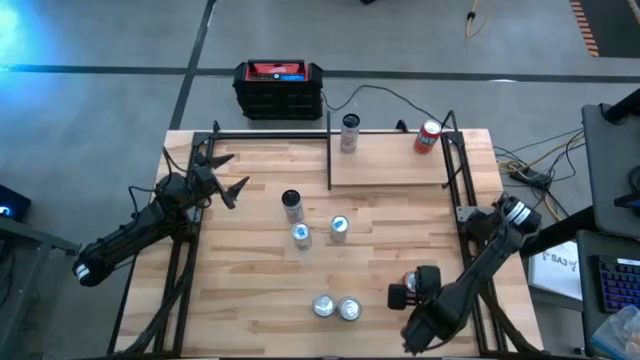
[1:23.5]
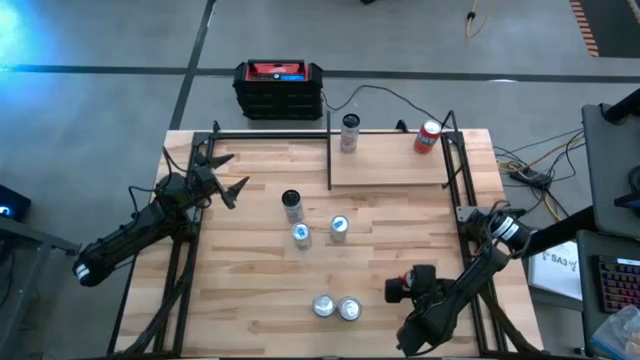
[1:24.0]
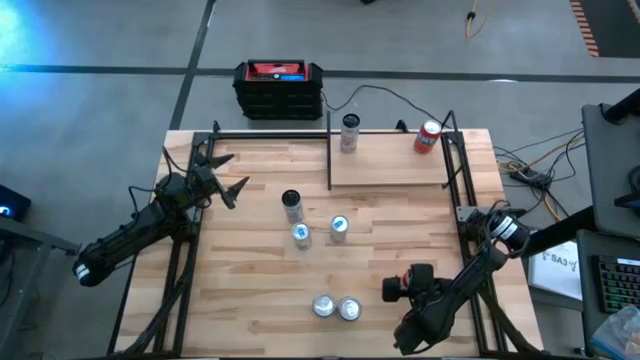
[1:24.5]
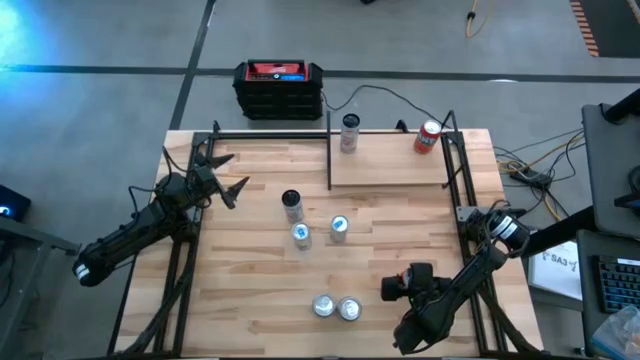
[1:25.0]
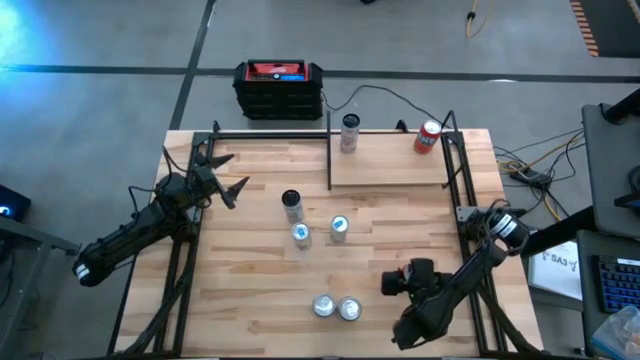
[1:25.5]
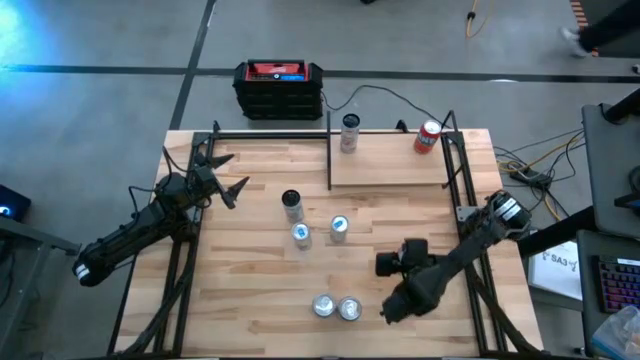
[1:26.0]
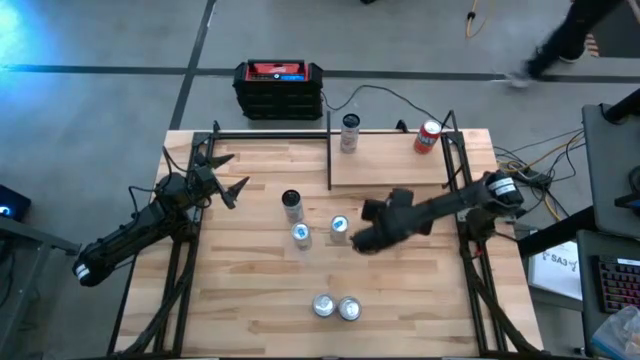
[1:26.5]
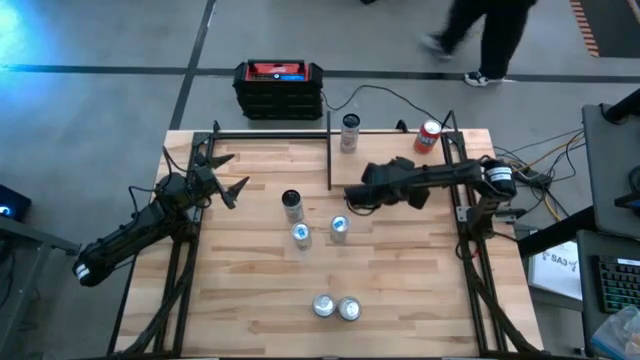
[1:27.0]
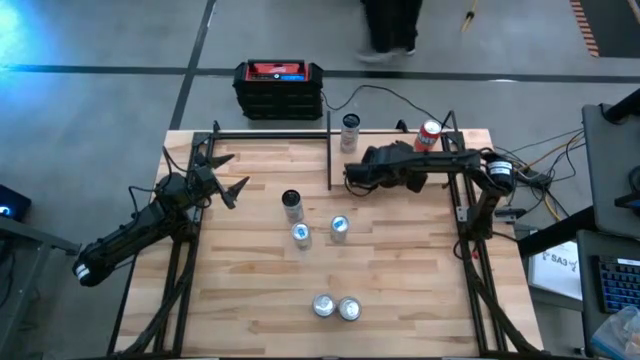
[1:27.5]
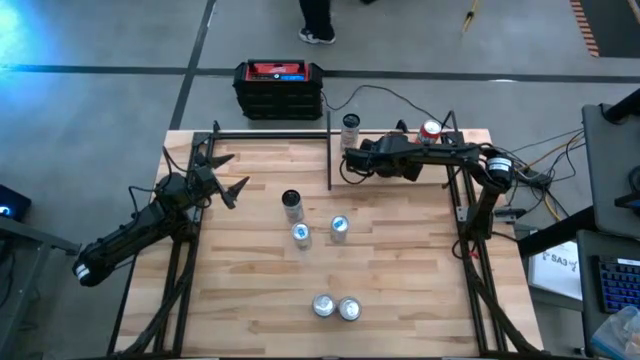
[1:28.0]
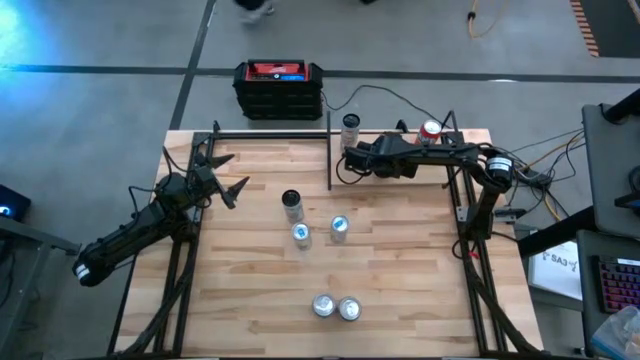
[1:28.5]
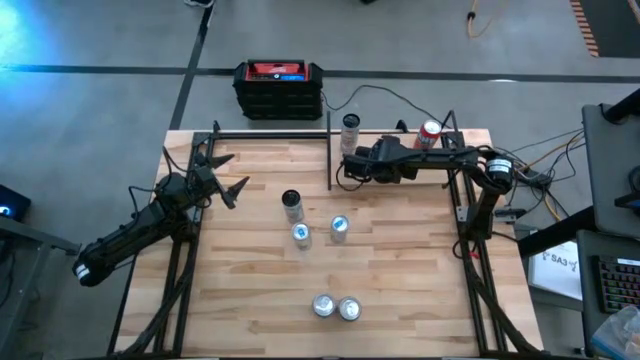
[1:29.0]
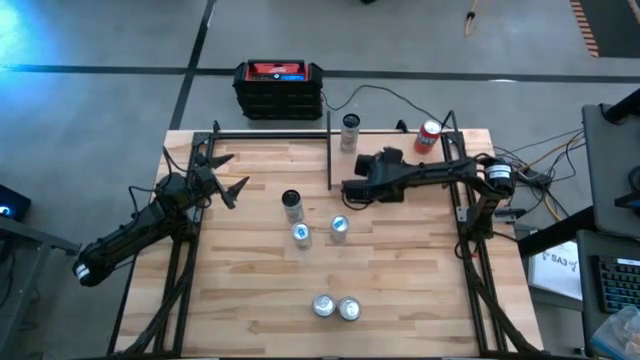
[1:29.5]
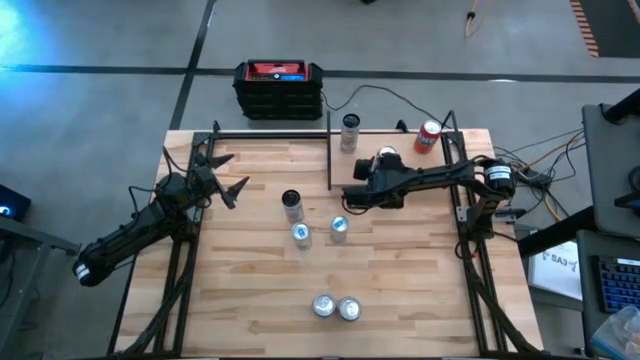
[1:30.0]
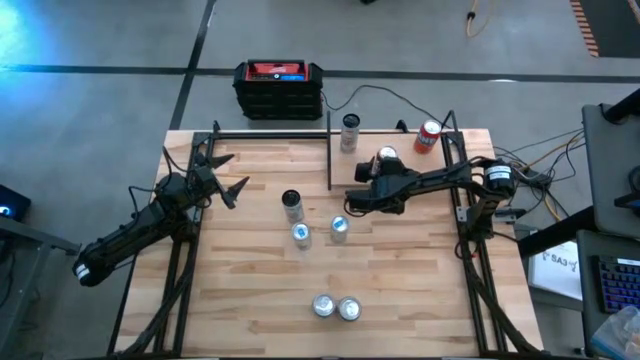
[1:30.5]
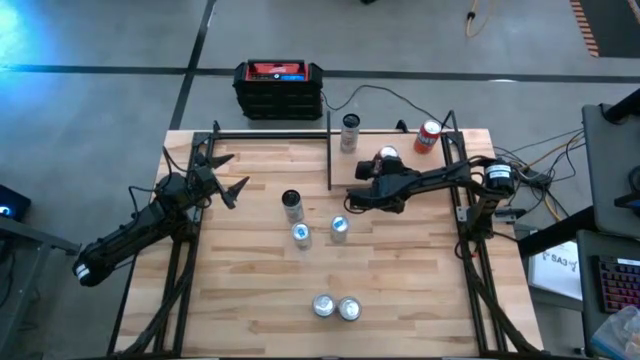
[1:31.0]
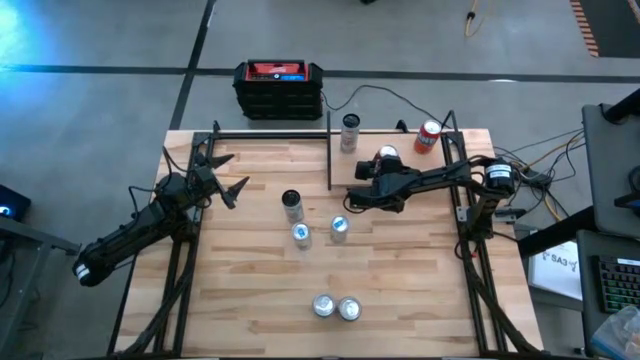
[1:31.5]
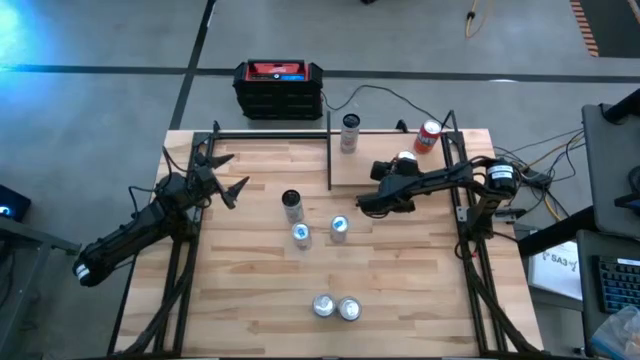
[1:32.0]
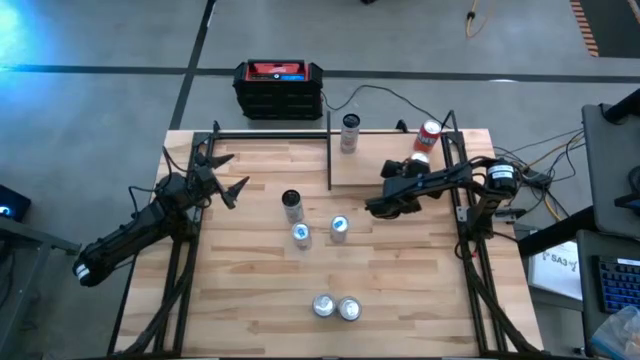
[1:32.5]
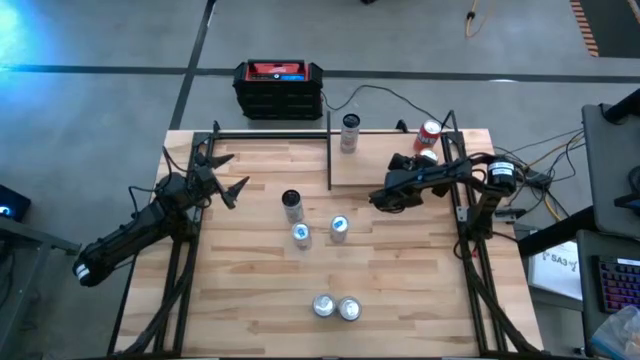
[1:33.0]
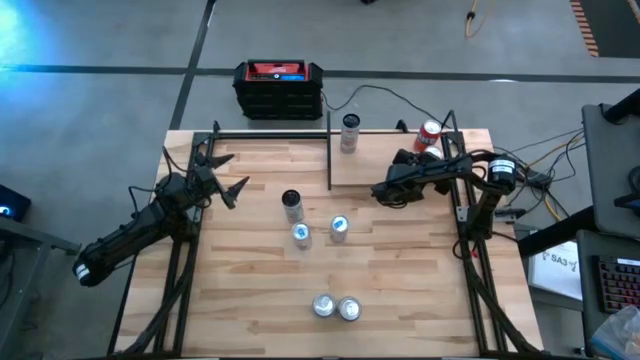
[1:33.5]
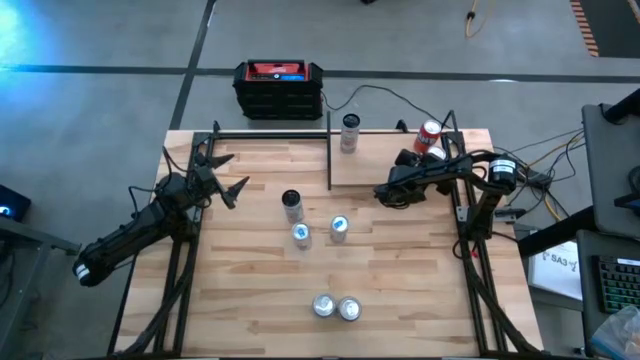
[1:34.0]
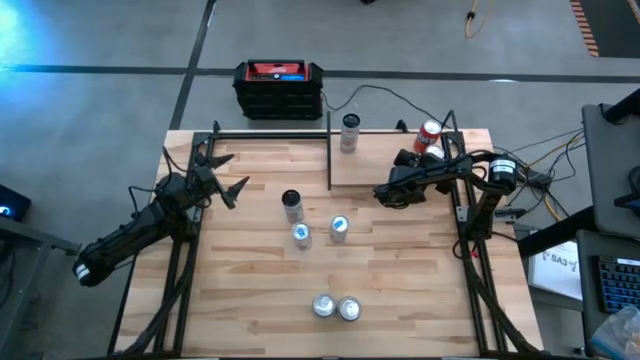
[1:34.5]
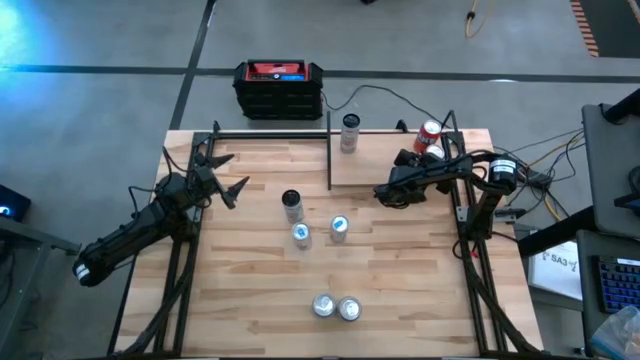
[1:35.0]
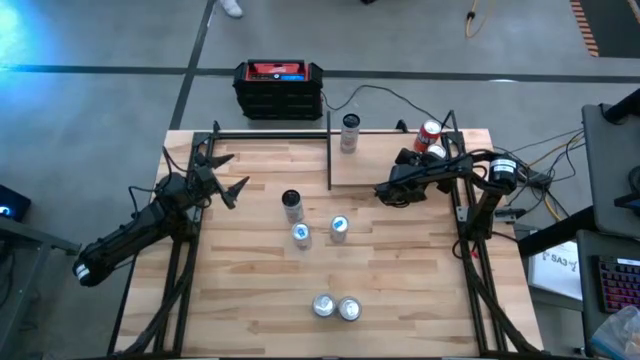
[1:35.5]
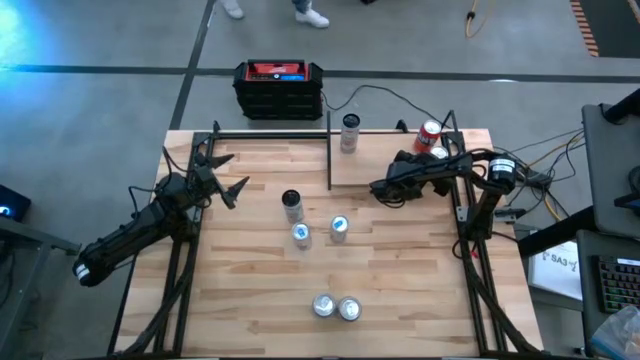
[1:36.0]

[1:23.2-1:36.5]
Task: Place canned beverage on shelf
Put the red soda can on the shelf aligned with the other red soda can

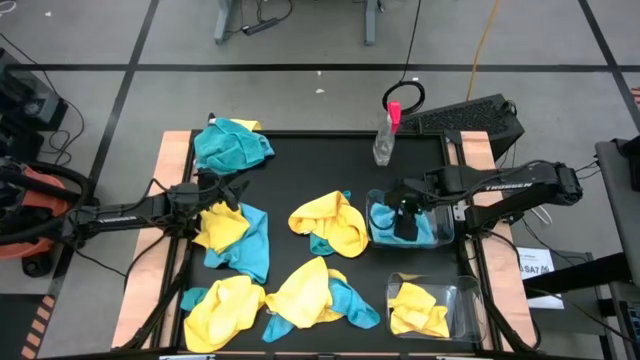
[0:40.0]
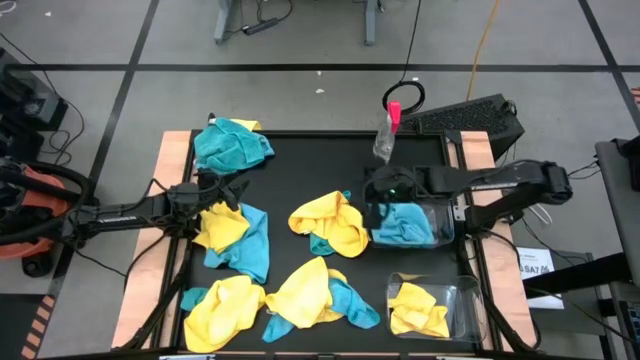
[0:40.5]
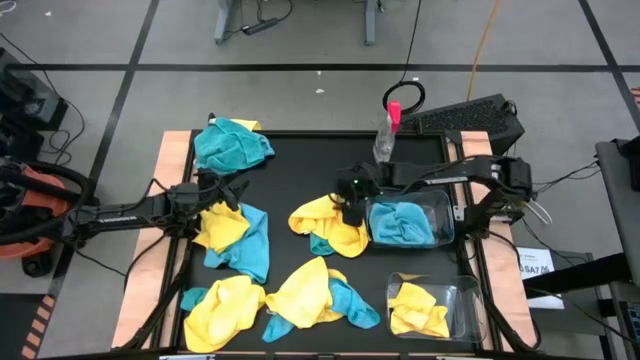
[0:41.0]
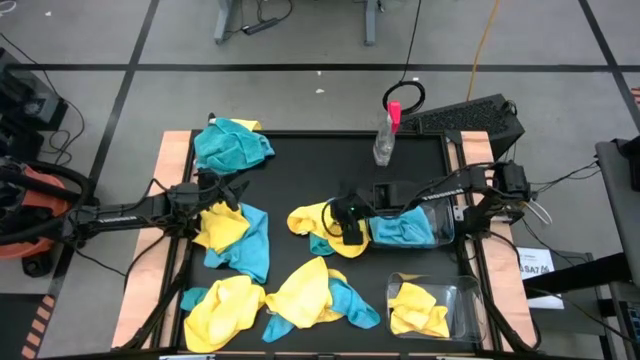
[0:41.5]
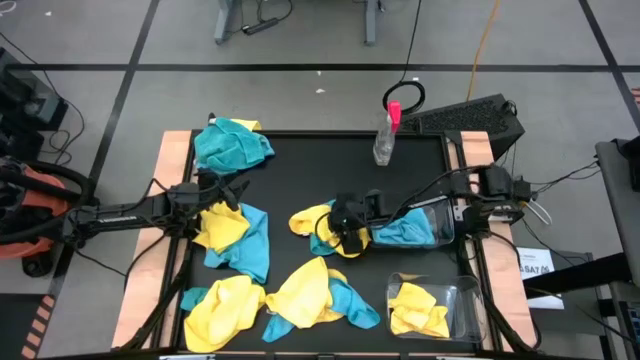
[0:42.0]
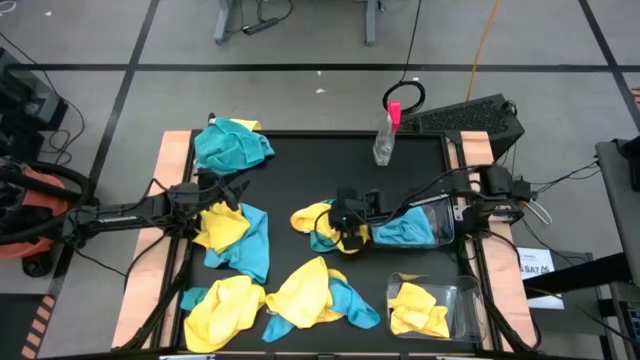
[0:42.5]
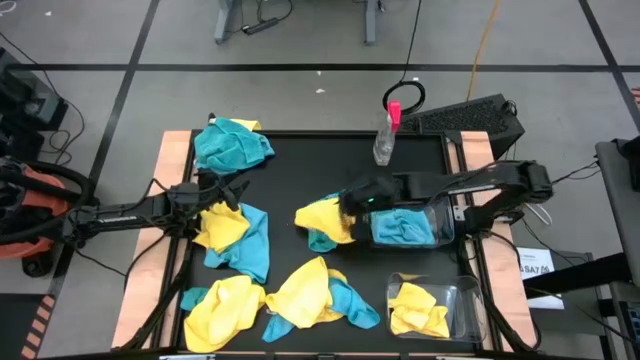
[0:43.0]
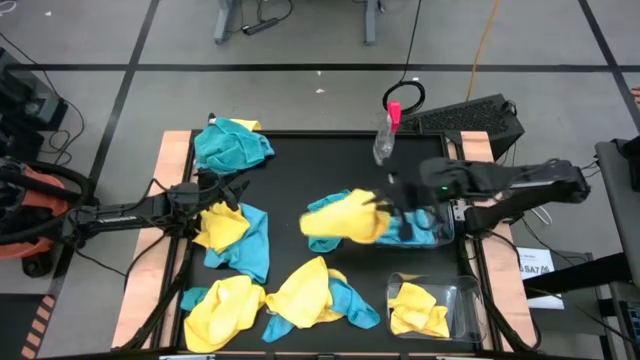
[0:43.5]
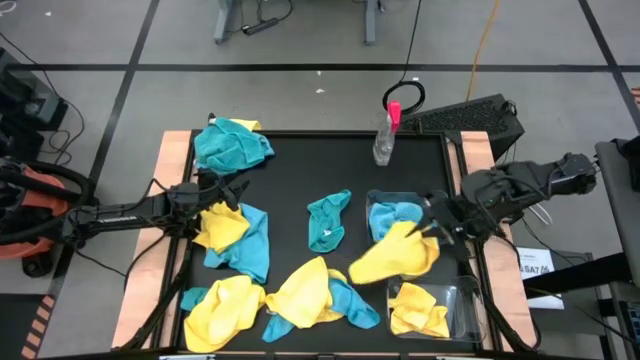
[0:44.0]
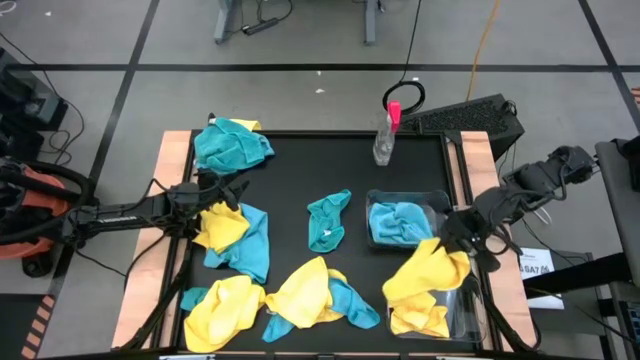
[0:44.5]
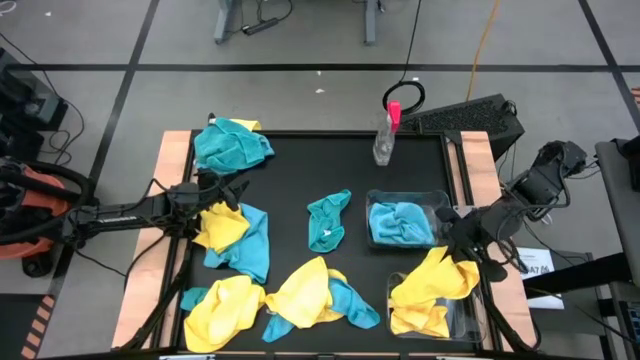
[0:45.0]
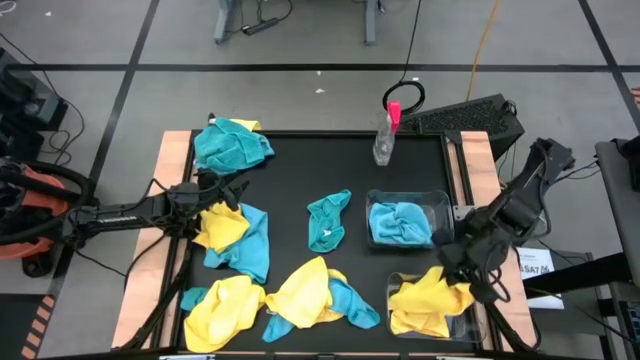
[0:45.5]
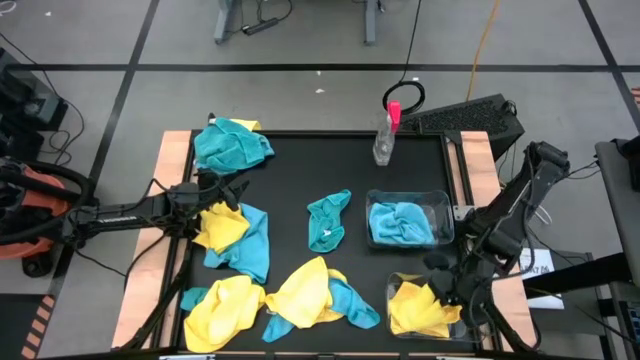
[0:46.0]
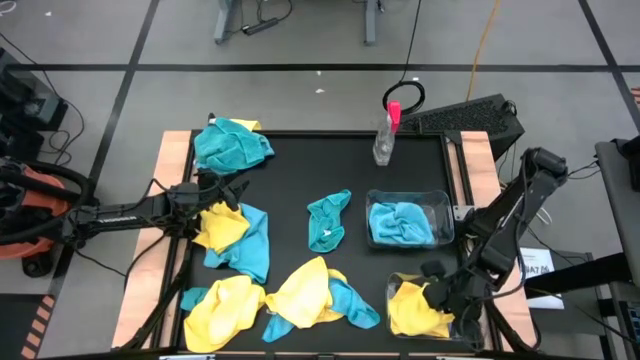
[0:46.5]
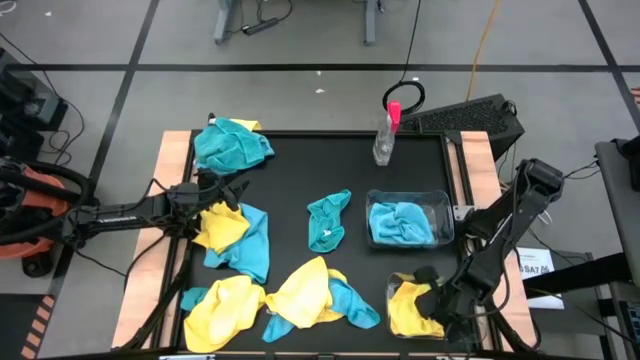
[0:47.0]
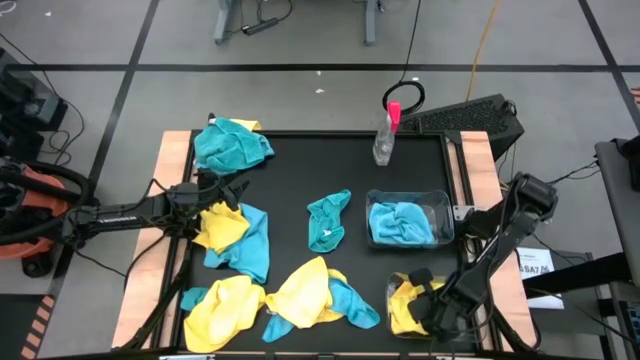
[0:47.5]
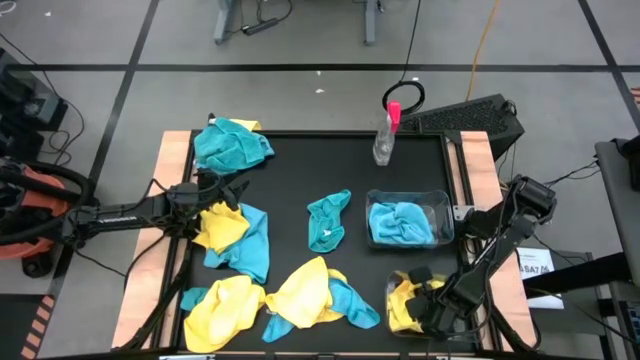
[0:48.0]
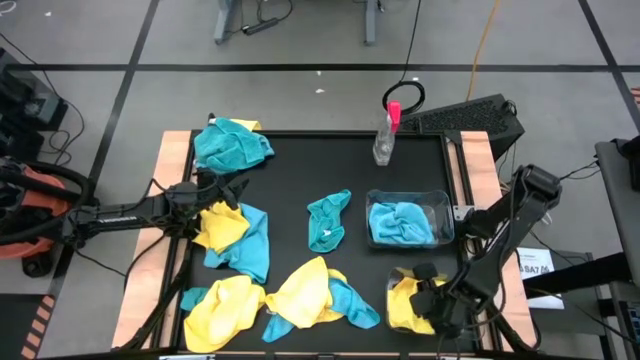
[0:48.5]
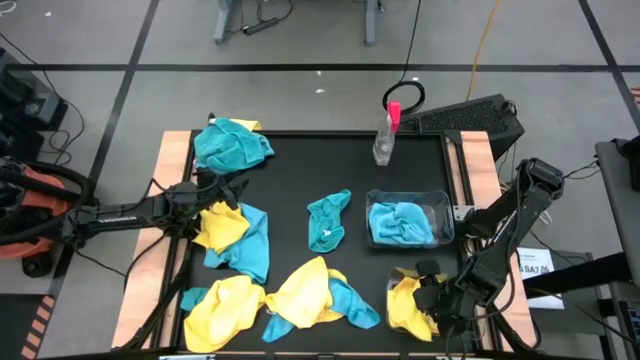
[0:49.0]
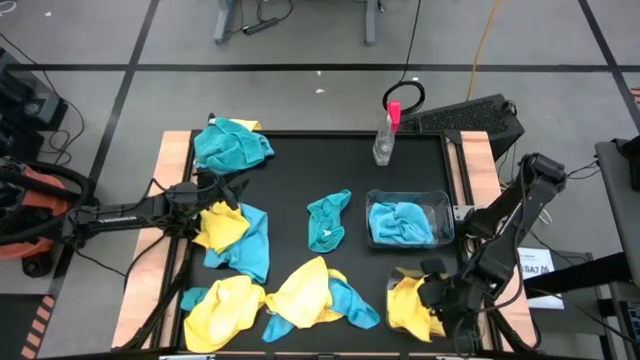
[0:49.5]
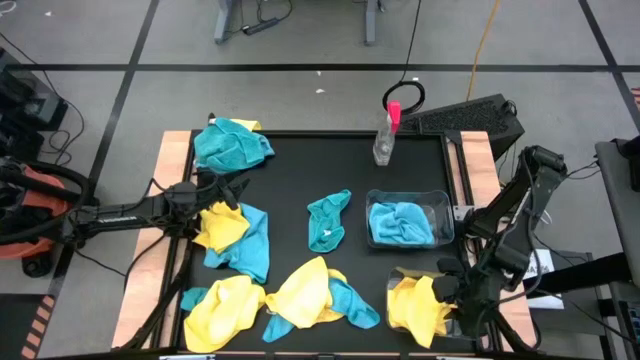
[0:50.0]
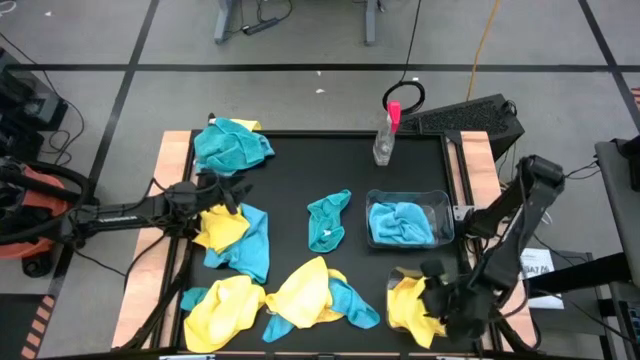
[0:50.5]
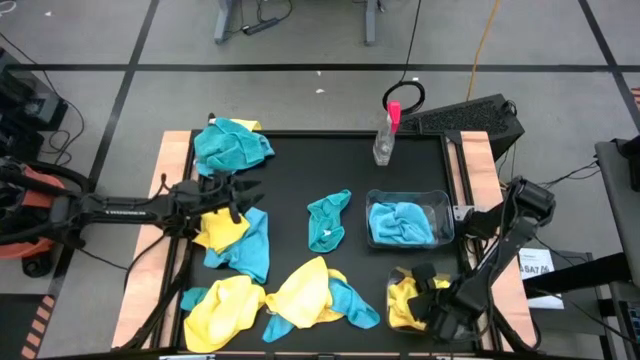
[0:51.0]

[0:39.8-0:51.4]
Task: Sort microfiber towel by color & place in baskets
Put the yellow towel into the bottom transparent bin
